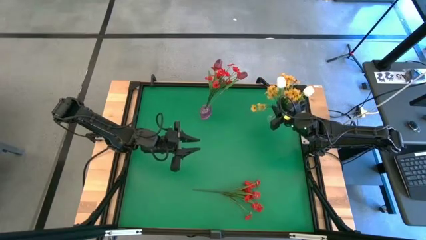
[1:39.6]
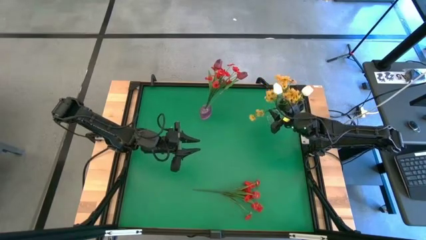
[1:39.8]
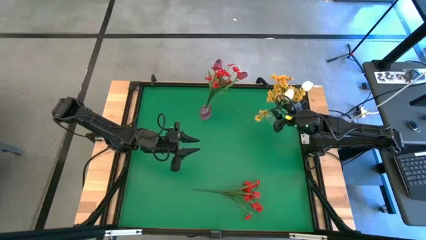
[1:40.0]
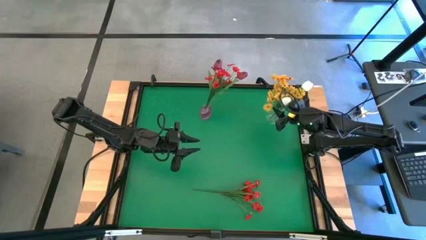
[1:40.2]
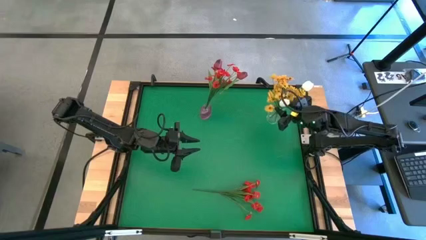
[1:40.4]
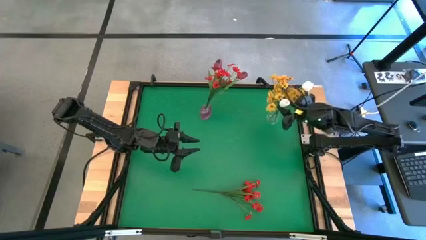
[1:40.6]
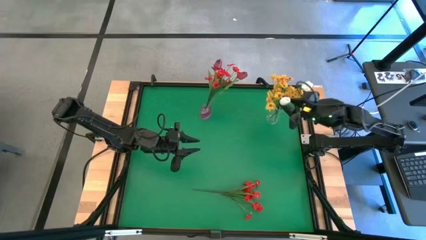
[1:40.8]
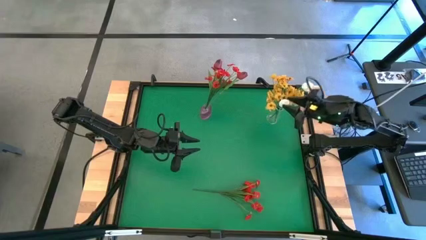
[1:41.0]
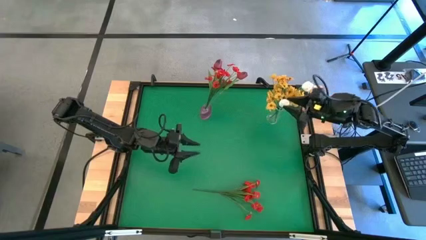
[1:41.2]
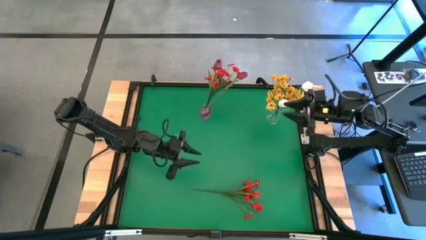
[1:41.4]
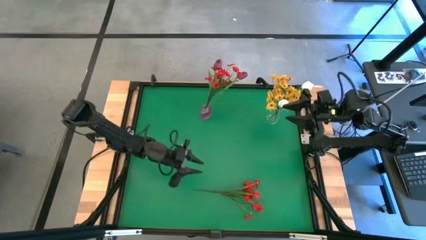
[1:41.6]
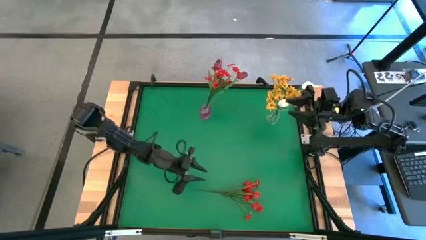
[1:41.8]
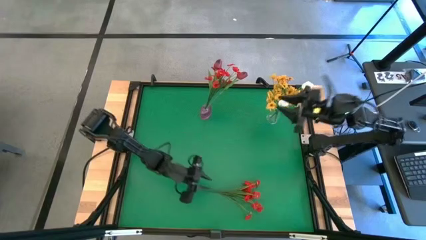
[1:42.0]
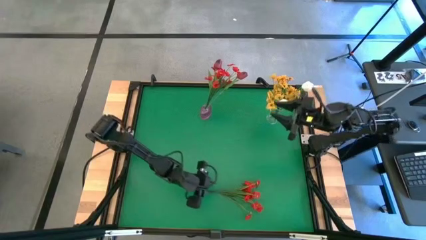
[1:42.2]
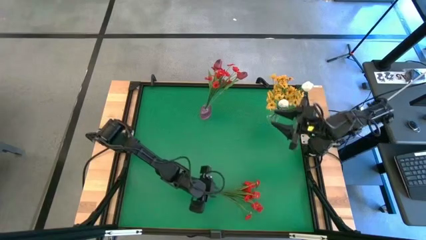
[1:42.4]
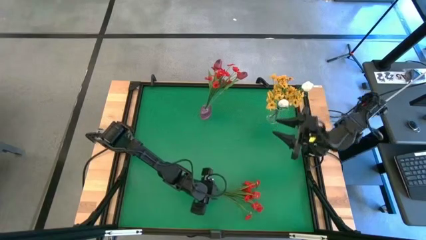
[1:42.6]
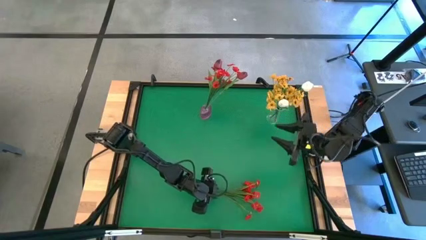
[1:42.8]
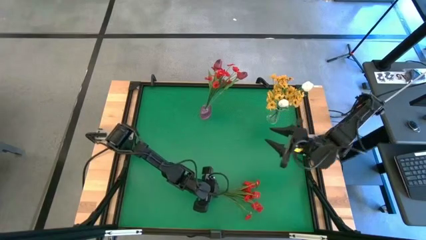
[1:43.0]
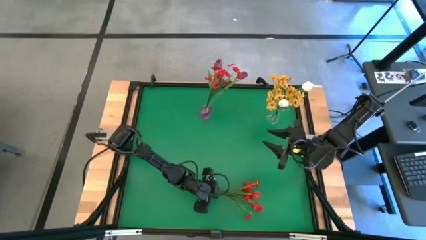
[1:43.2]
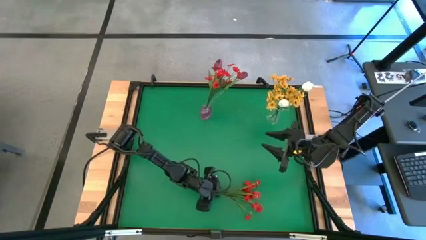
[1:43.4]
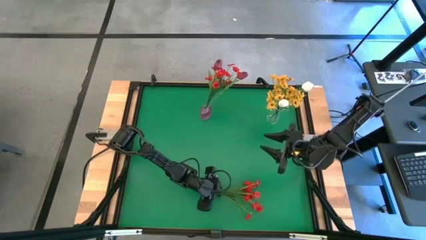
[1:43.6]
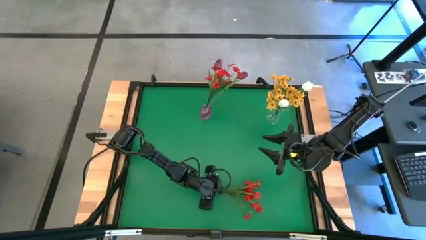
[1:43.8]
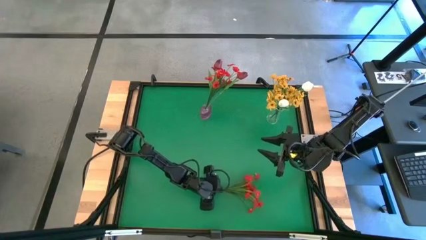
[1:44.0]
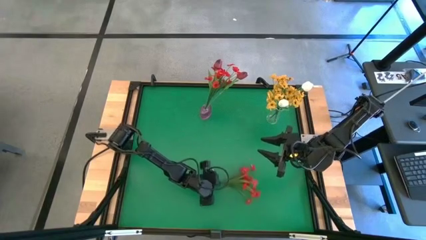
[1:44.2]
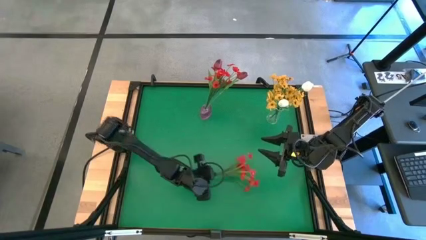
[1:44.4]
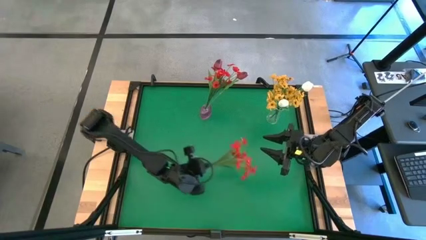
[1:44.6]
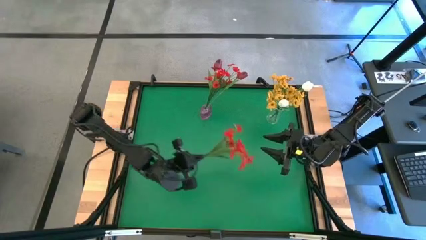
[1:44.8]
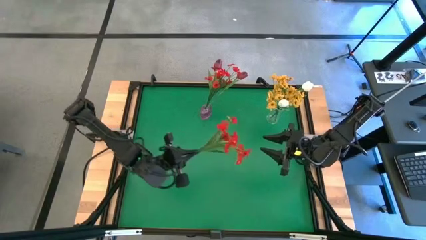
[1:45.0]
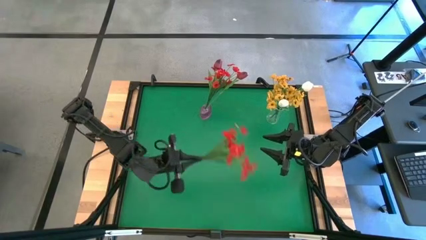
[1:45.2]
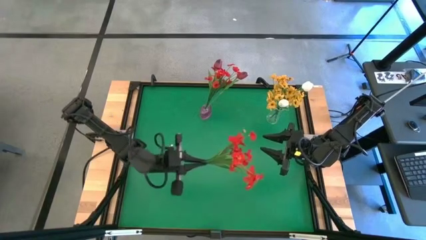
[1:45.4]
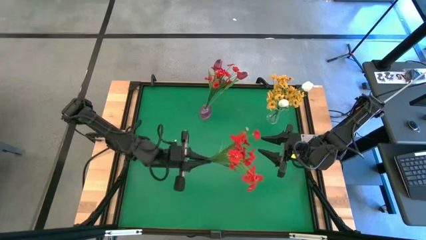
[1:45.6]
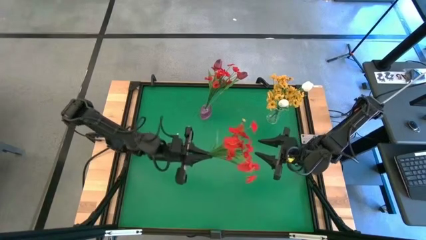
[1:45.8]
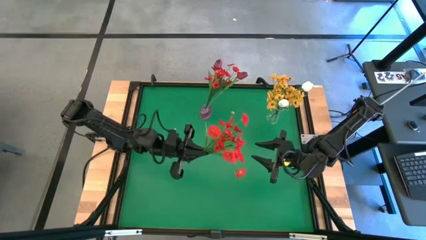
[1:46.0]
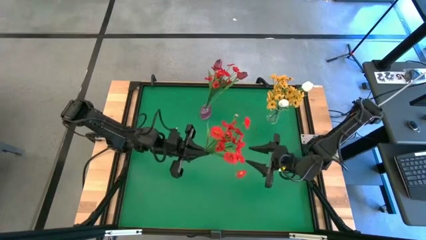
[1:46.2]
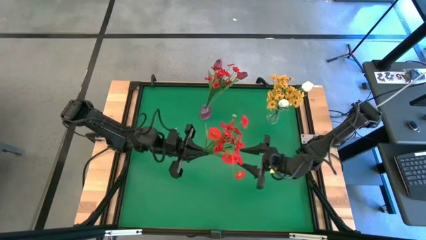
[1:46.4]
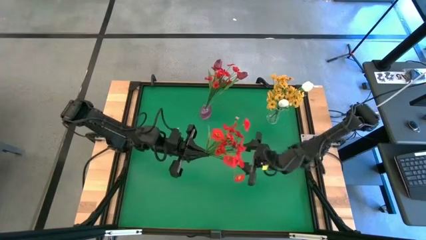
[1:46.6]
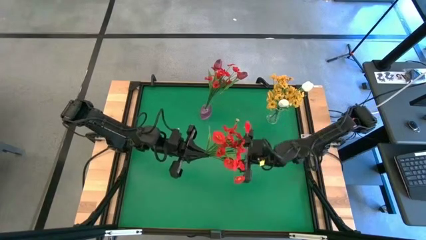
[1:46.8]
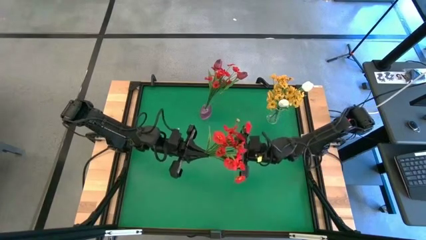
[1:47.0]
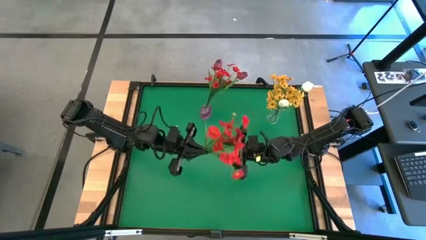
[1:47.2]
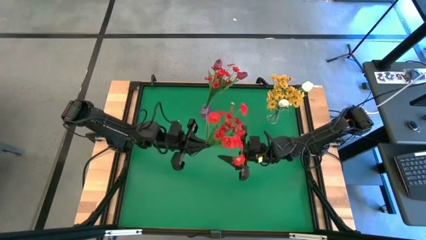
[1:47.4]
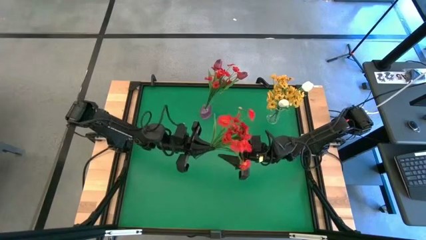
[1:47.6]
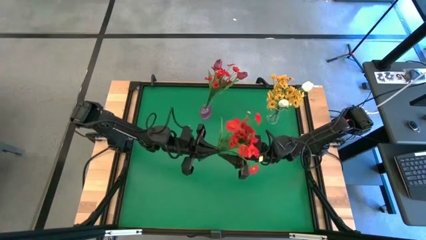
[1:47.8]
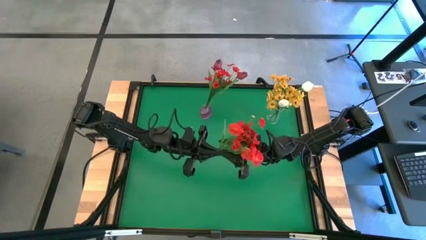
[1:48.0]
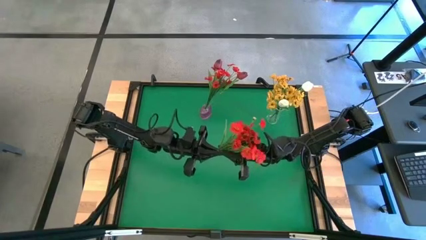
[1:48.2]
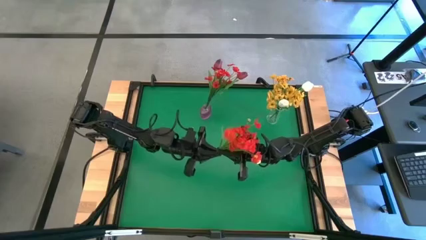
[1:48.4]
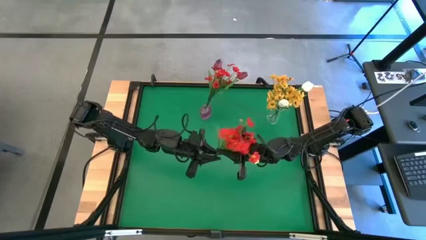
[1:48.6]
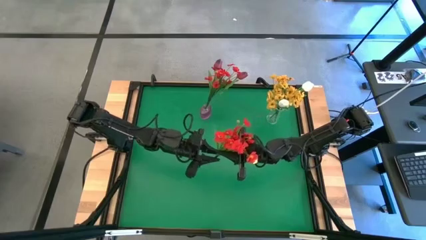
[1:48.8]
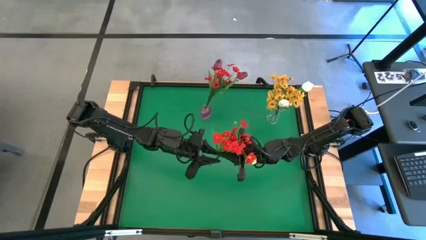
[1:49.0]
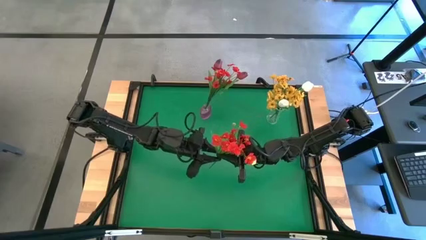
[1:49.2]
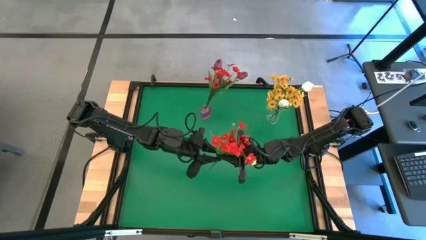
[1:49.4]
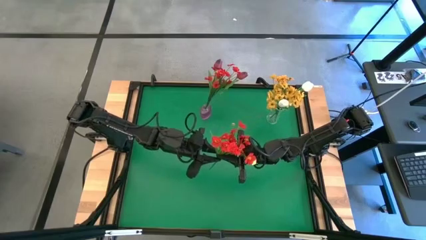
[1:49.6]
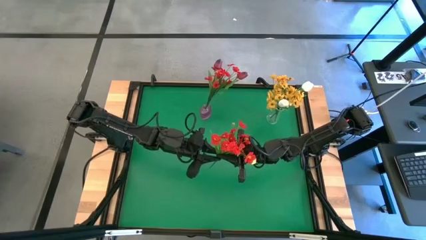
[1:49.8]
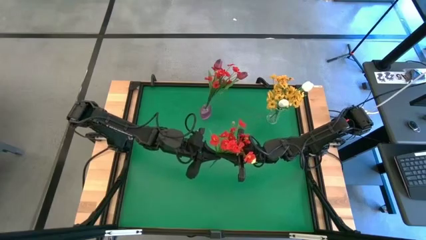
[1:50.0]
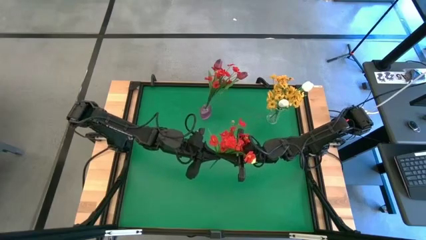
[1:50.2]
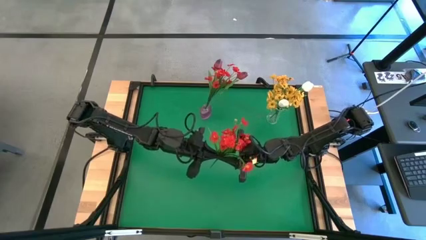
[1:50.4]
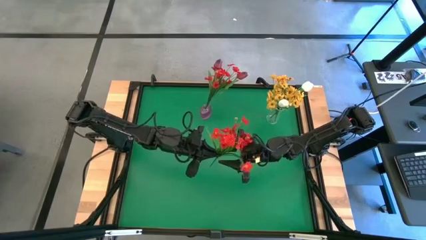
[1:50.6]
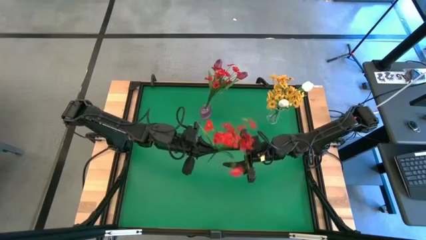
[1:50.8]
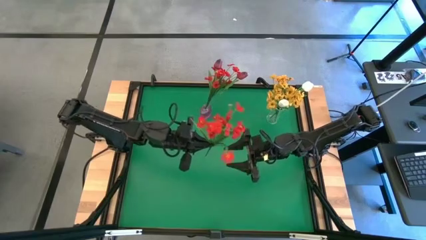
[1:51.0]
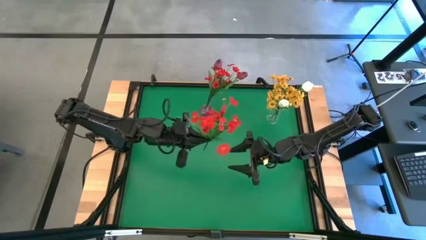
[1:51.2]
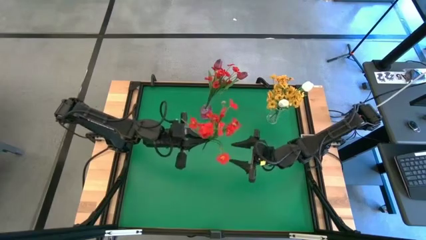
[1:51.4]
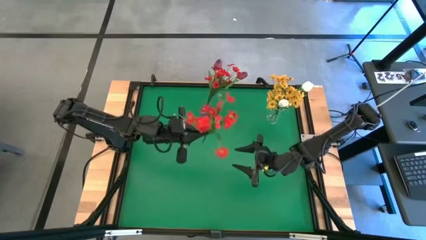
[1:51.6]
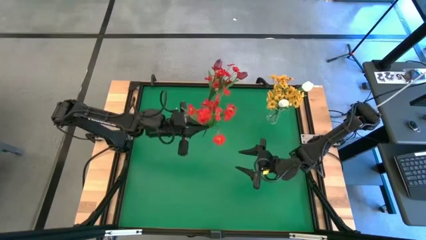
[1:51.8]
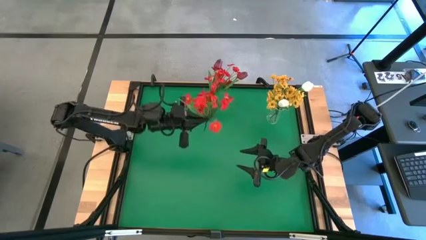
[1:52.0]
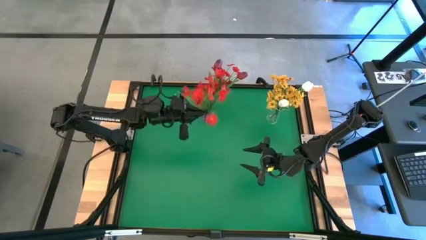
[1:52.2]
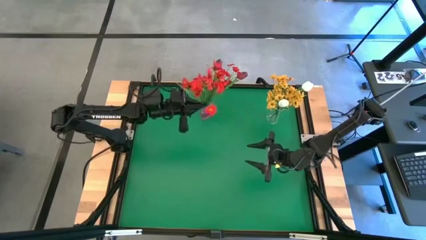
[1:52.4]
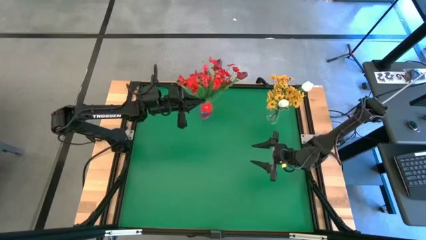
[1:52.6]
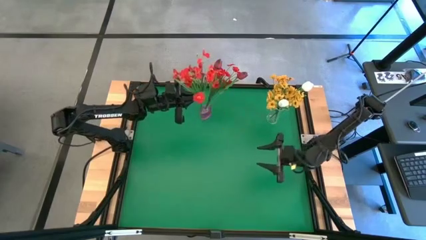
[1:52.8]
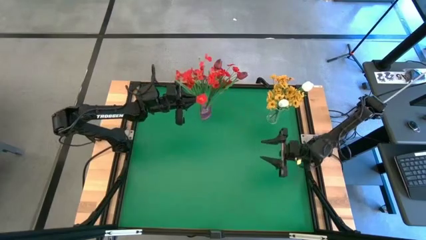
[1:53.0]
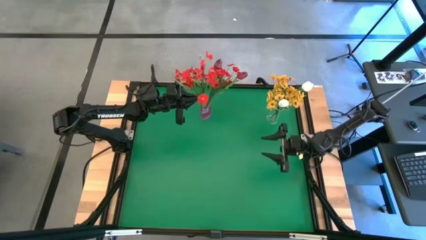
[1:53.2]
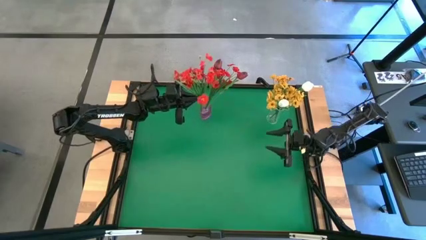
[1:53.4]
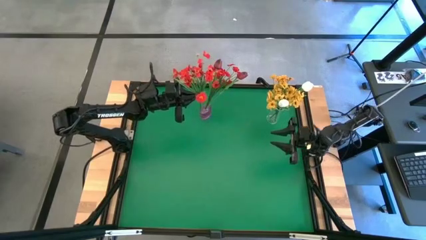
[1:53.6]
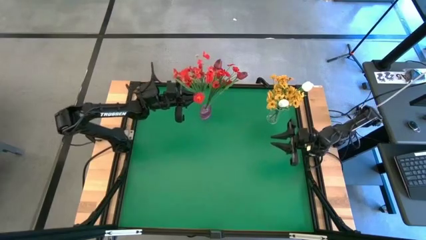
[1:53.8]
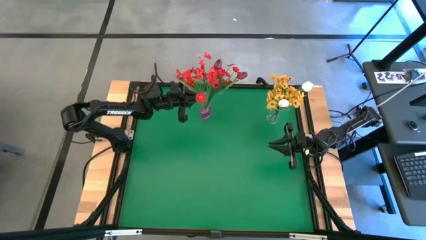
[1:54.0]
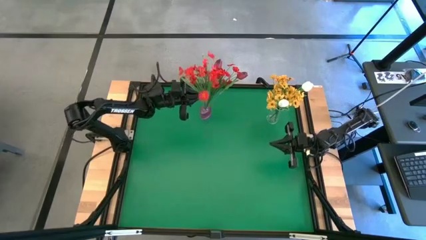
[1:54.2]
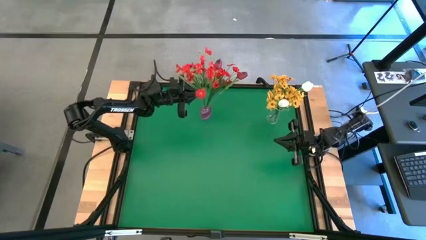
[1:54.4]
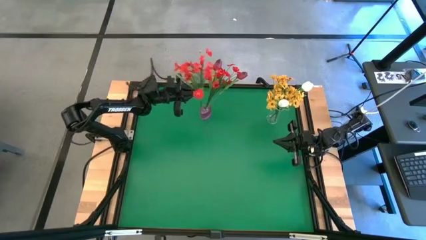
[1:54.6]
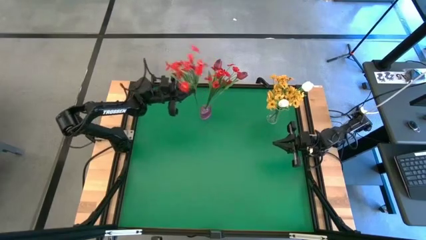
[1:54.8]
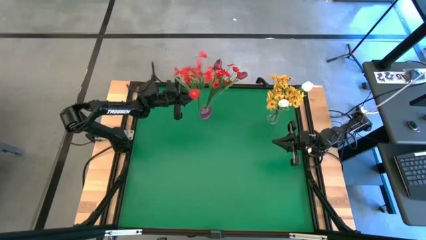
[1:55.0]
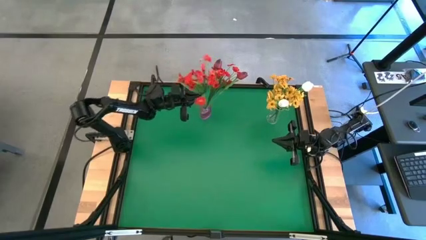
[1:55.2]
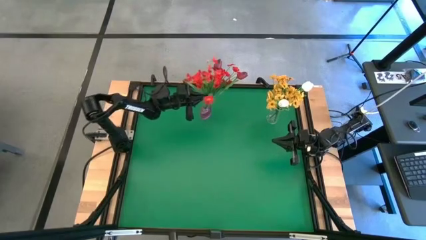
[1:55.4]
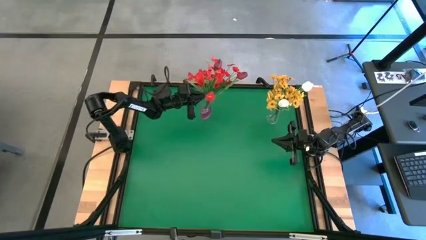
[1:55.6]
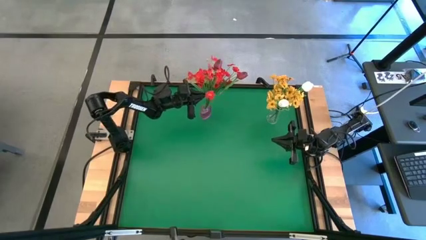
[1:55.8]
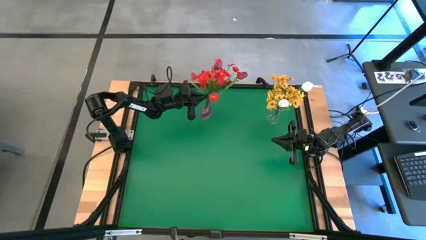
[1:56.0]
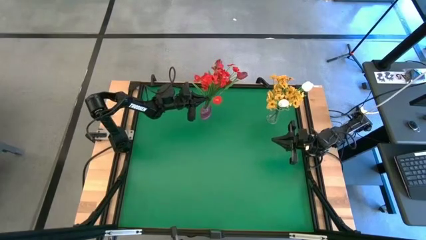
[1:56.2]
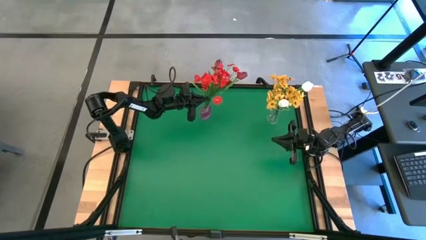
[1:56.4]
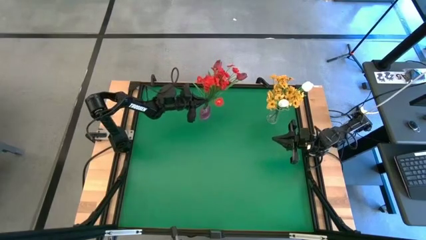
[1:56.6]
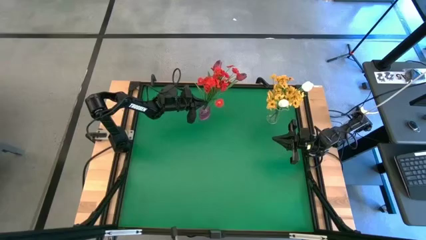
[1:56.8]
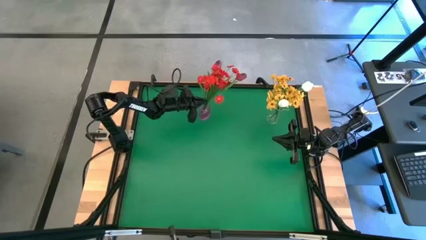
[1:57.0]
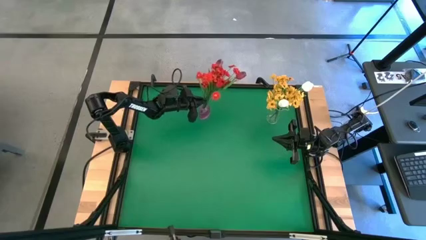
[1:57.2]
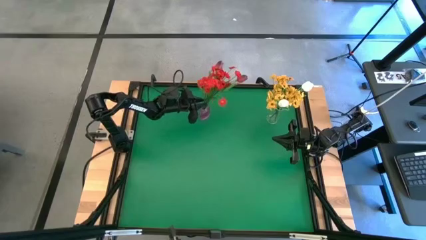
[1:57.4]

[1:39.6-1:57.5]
Task: Sort flowers into vase by color
Put the red flowers into the pink vase
